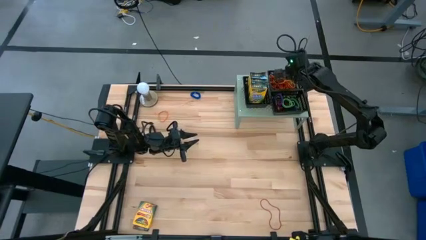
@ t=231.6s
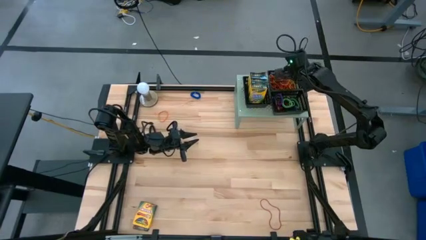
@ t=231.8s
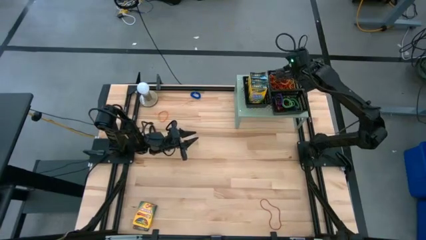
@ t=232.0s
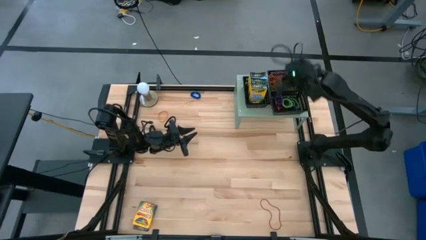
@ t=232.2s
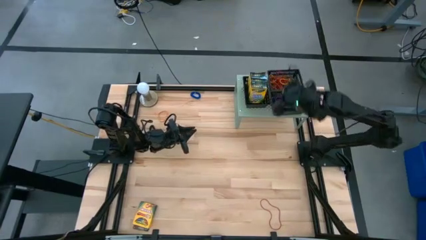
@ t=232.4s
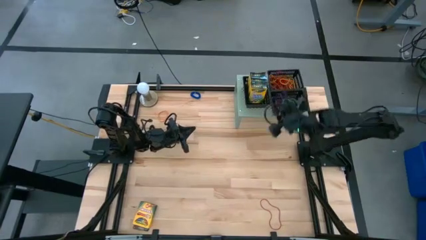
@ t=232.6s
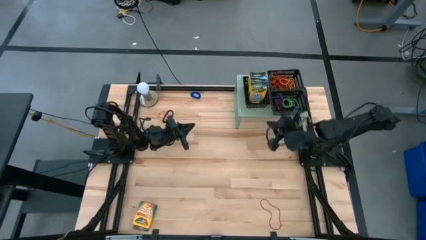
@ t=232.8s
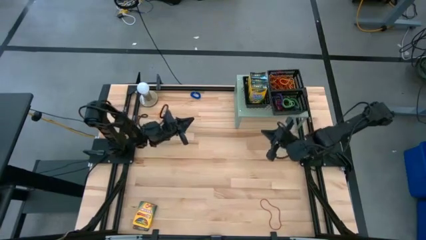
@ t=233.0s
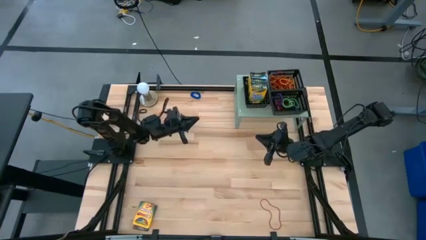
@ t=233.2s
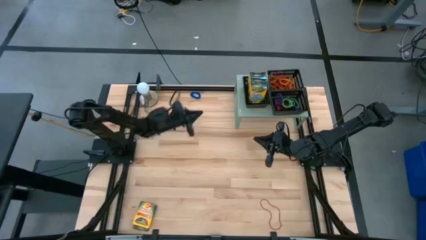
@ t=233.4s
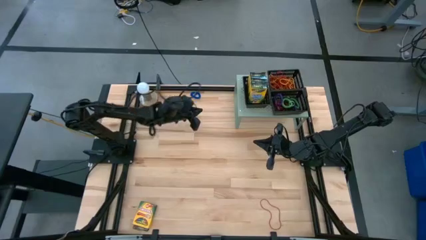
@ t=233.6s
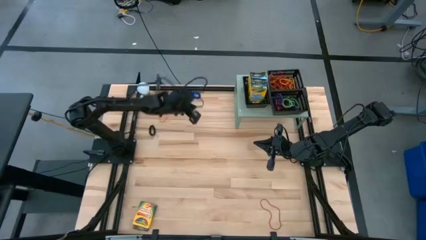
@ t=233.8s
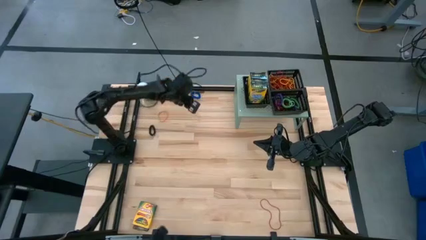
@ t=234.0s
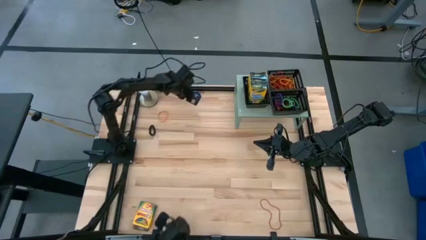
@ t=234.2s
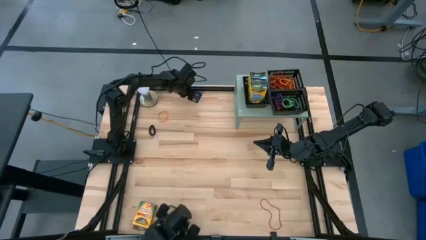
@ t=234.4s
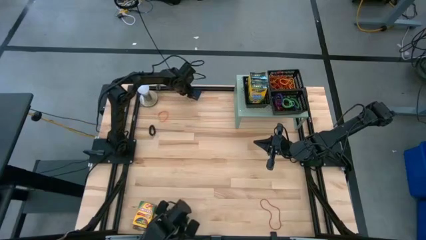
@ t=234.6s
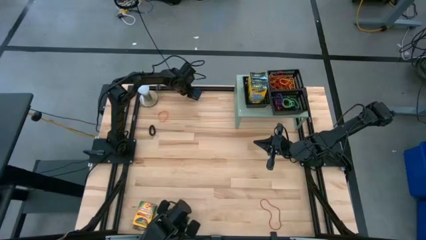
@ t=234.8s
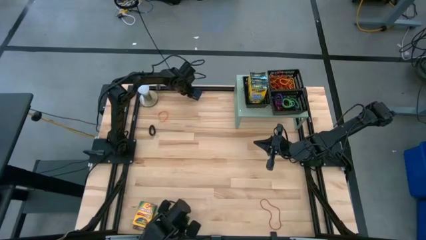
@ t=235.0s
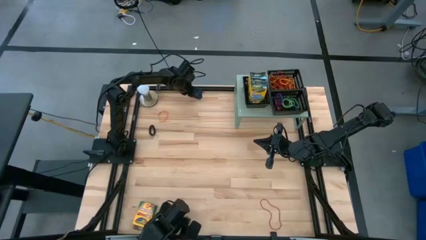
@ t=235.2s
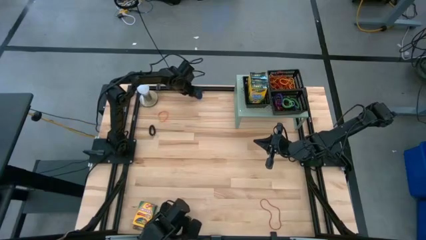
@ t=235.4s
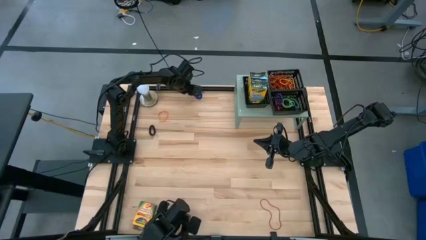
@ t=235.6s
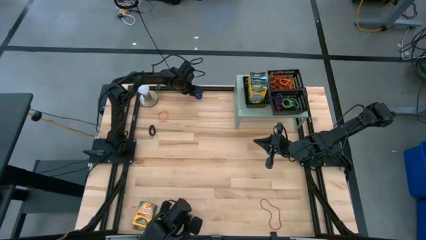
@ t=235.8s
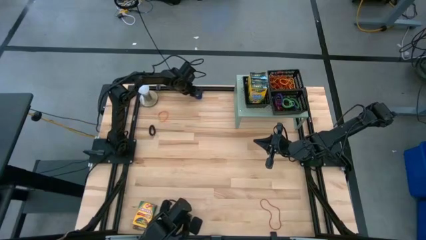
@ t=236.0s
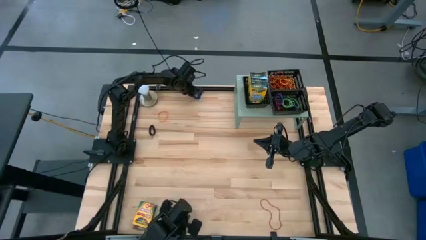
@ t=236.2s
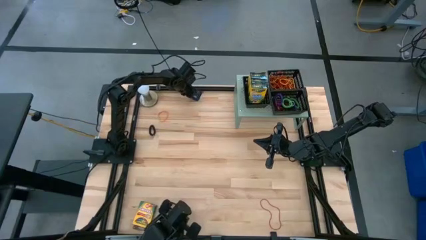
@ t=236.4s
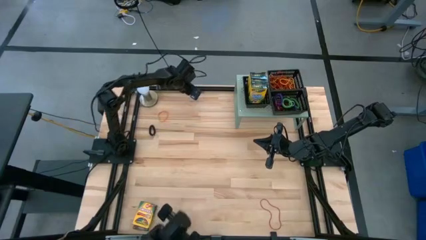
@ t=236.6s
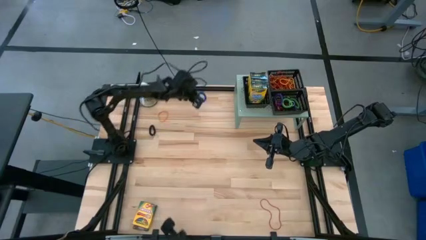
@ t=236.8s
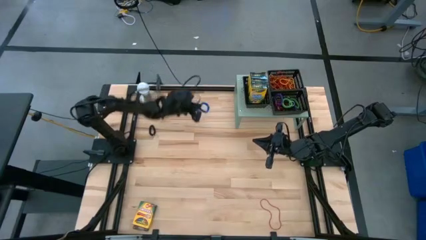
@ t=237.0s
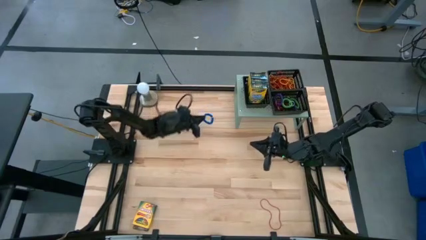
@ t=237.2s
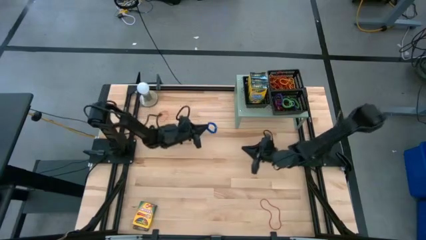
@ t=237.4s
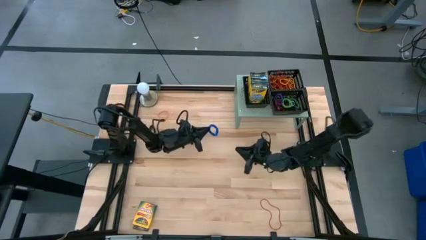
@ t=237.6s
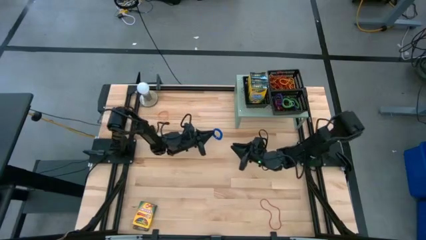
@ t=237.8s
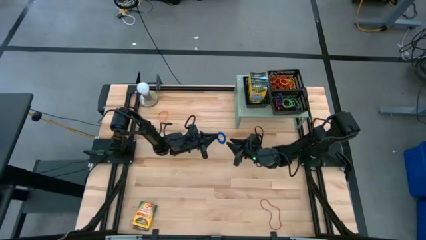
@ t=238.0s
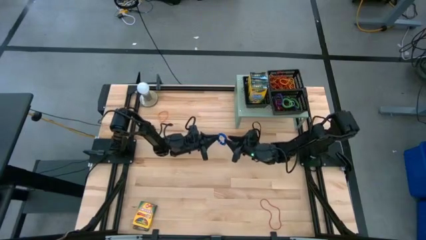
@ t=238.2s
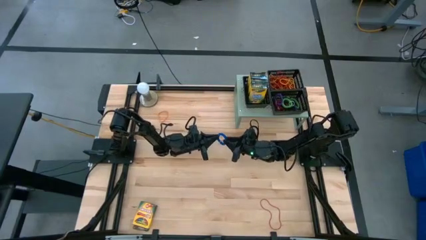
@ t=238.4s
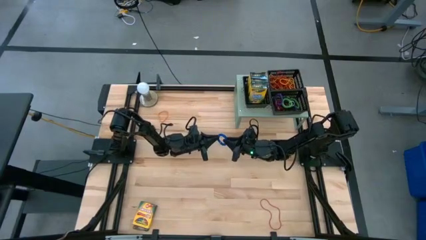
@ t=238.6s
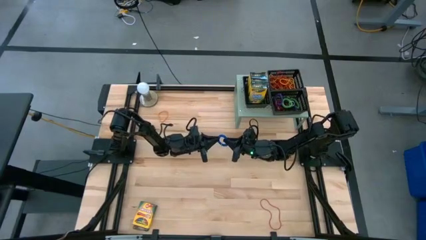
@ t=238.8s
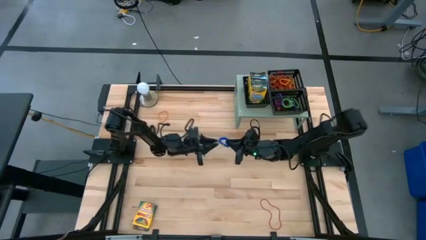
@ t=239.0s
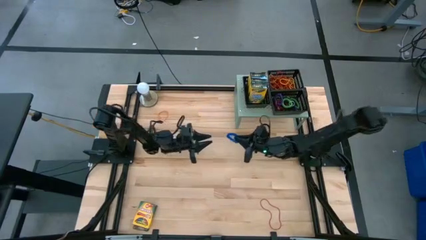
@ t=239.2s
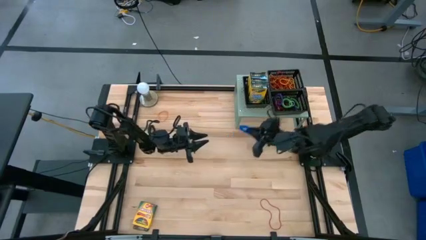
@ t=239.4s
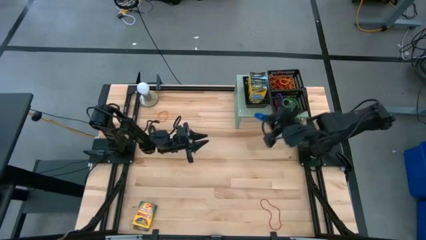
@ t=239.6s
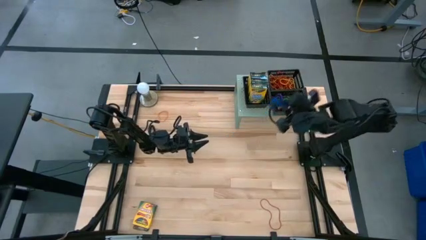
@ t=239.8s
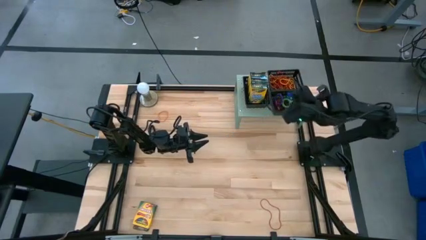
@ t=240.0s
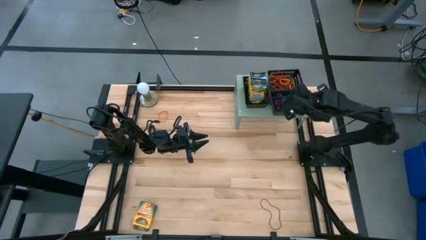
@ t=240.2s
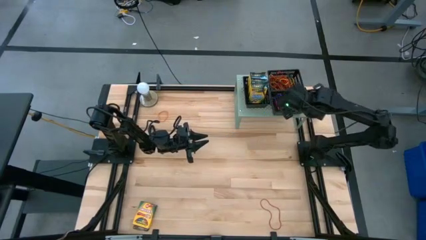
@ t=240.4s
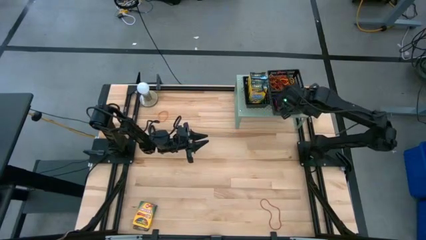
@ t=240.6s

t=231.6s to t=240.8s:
Task: Pick & Place Office Desk Supplies
Put the blue spring keychain into the bottom right black bin on the shelf

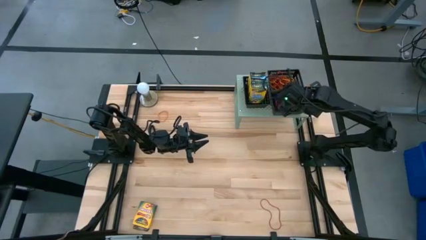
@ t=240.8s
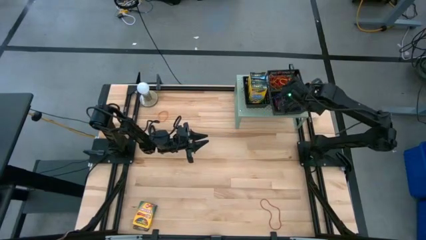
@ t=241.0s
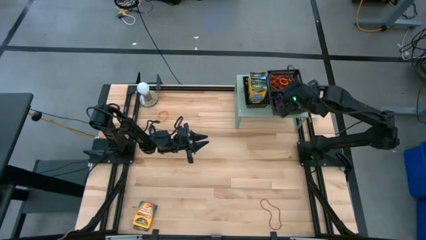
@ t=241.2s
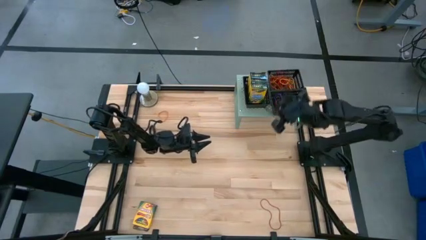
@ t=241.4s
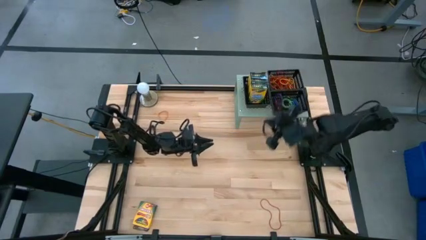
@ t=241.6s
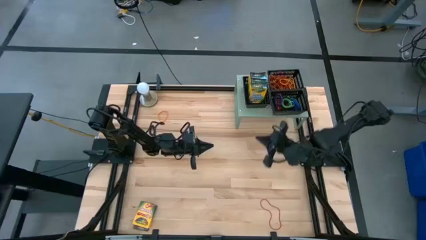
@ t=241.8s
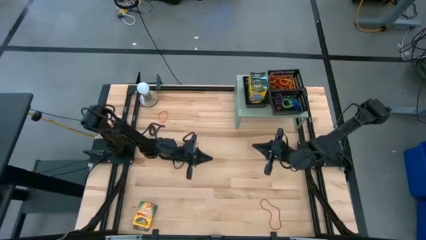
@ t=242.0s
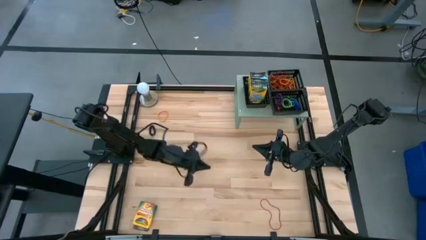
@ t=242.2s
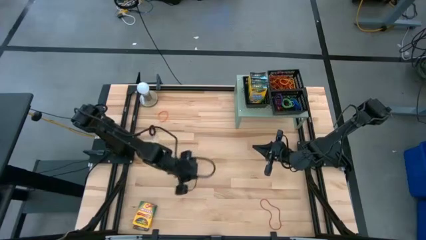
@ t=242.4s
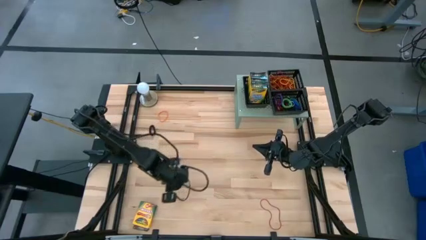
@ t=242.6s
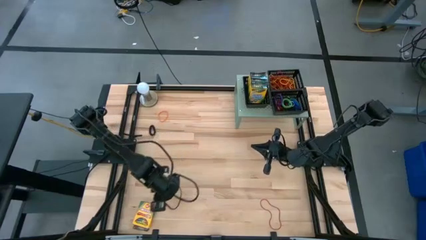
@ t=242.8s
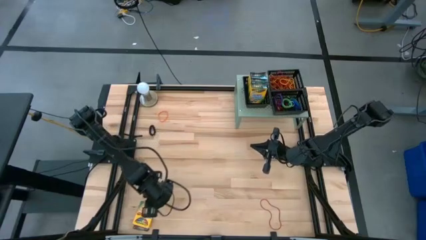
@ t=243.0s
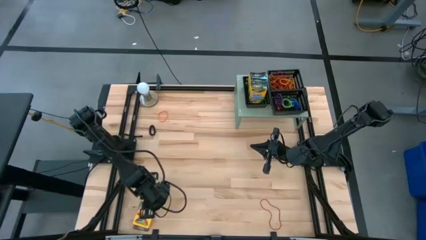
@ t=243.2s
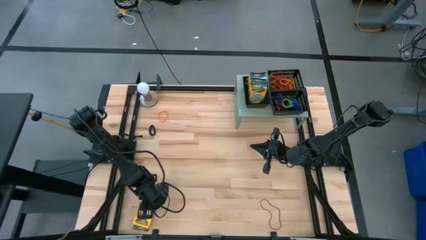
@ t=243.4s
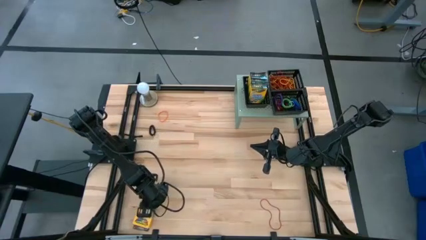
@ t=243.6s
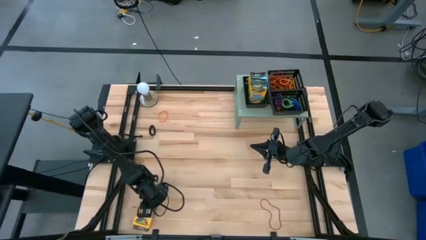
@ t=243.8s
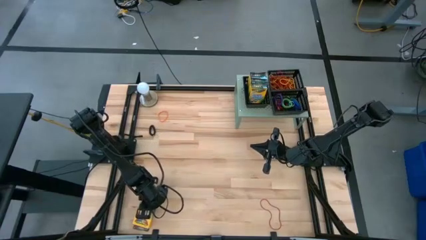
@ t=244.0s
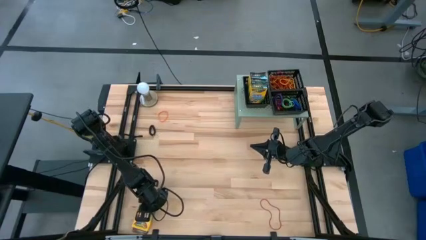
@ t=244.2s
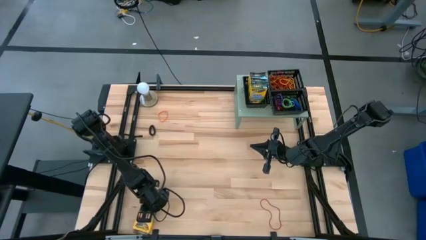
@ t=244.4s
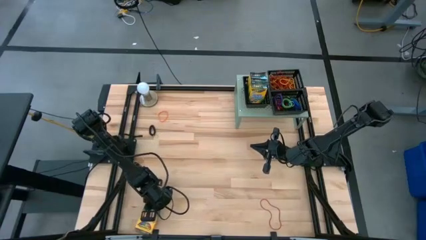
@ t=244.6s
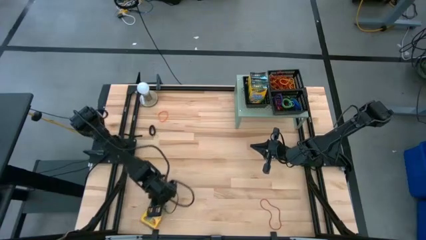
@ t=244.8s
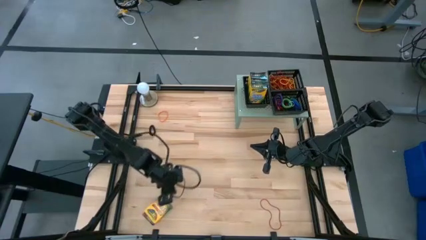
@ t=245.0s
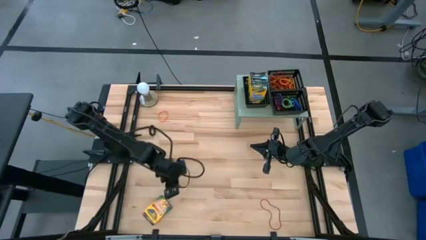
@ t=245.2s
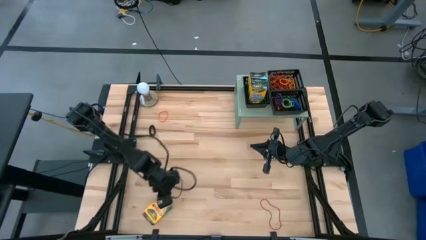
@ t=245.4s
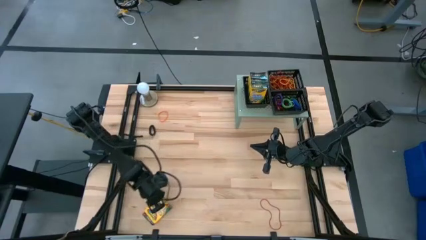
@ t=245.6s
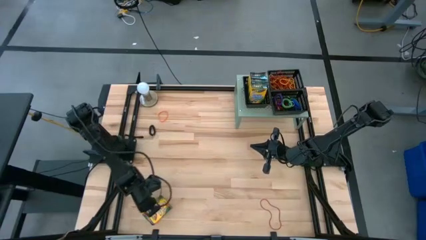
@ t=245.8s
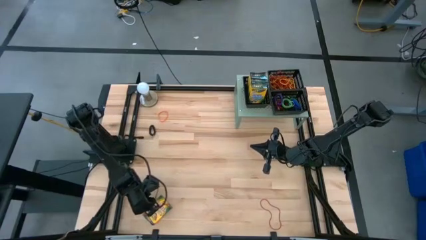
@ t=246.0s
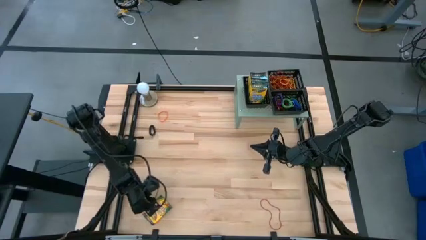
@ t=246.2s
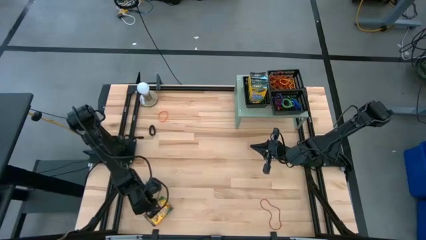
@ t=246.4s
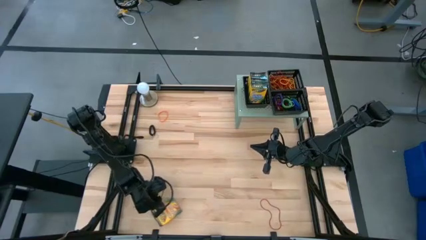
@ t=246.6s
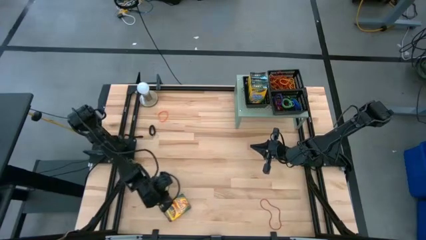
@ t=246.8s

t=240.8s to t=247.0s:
Put the yellow crayon box into the left black bin on the shelf

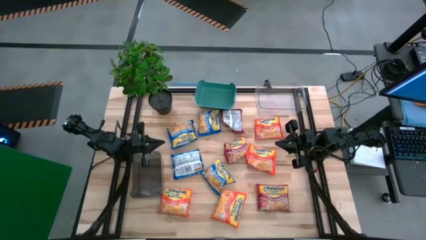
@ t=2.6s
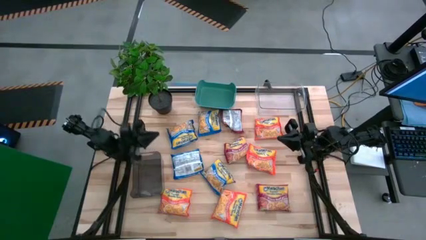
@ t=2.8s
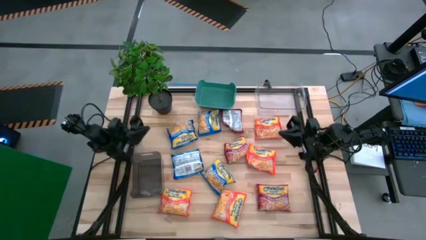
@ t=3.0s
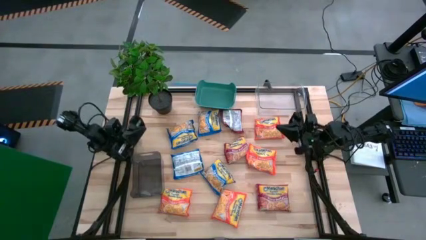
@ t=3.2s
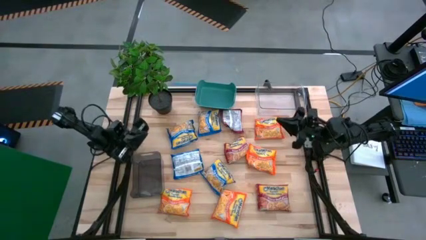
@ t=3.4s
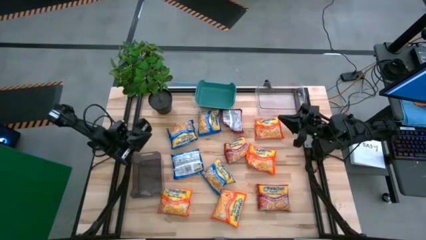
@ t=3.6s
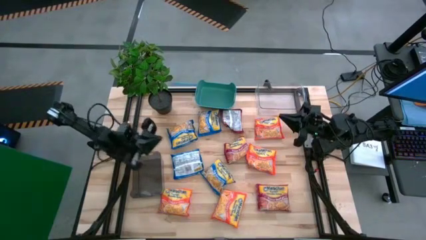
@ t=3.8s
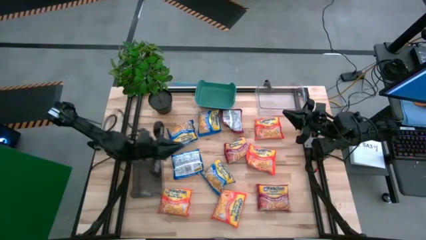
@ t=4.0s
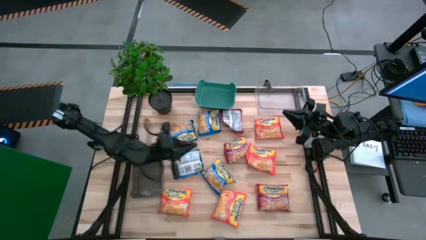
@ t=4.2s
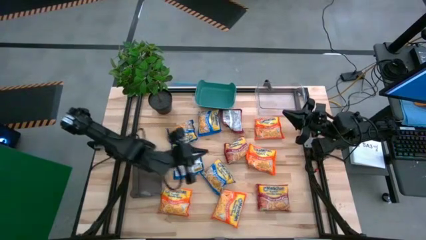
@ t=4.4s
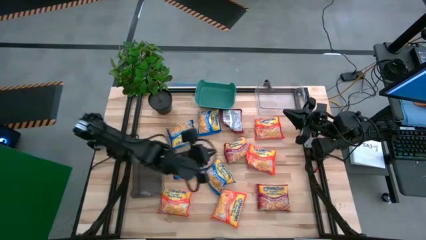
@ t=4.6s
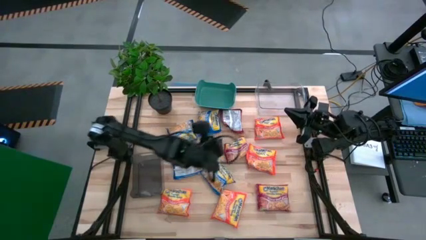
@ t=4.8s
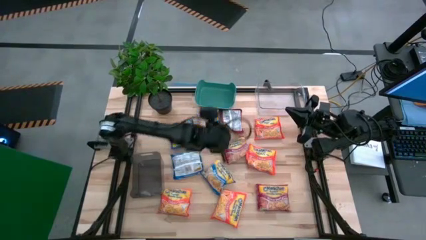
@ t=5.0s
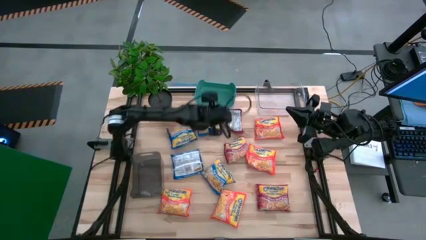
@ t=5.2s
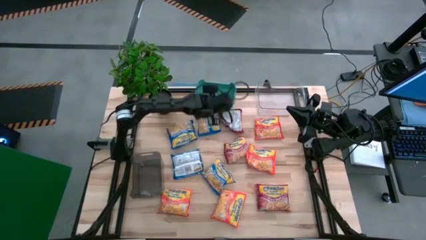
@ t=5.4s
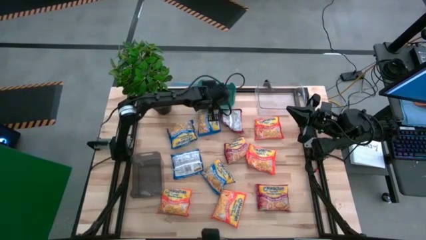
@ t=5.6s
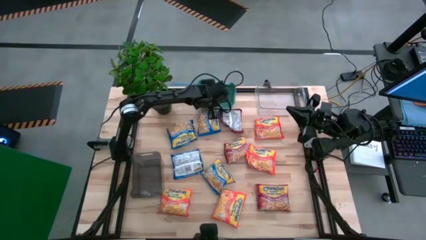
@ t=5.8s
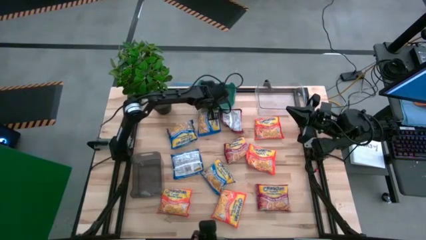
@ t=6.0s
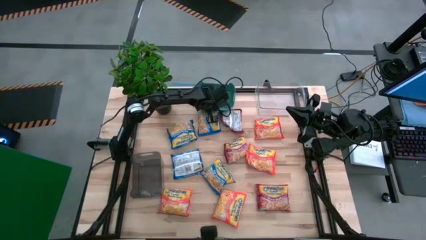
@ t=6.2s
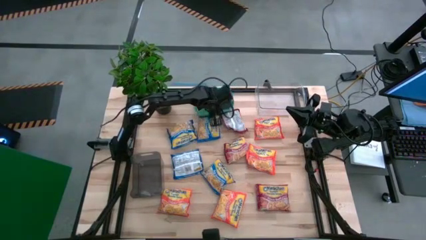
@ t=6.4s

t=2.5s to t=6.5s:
Task: Sort Maruchan noodles
Adjust the green bin
